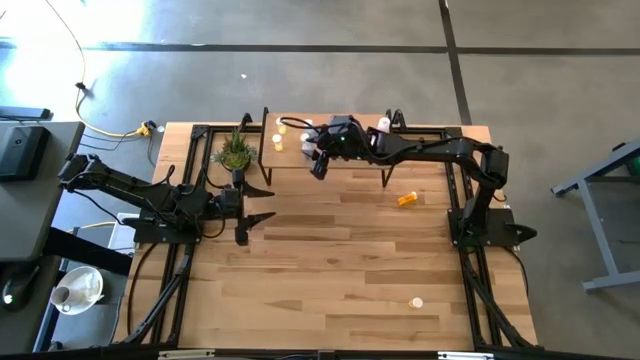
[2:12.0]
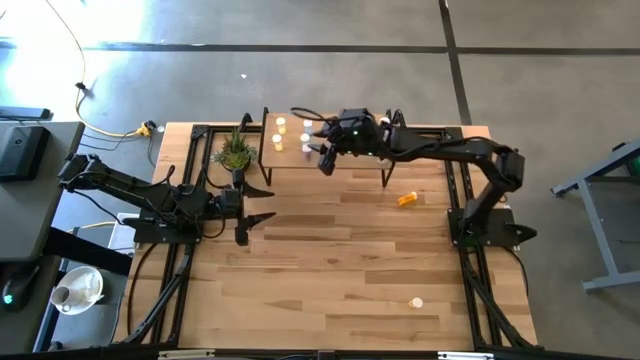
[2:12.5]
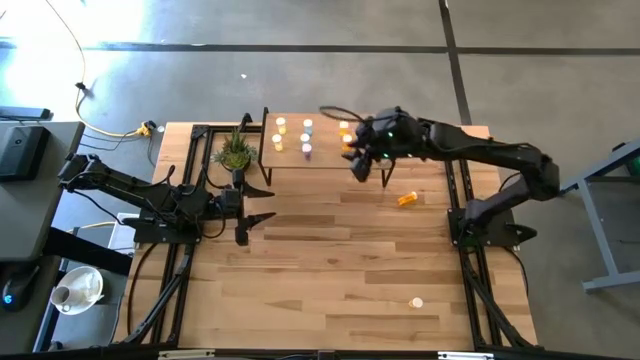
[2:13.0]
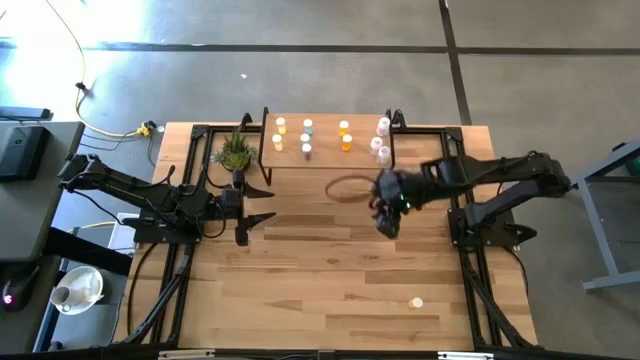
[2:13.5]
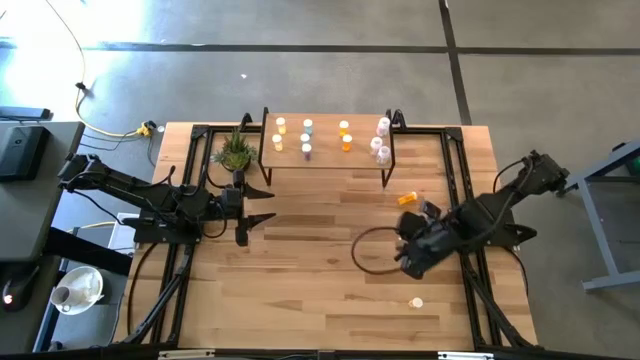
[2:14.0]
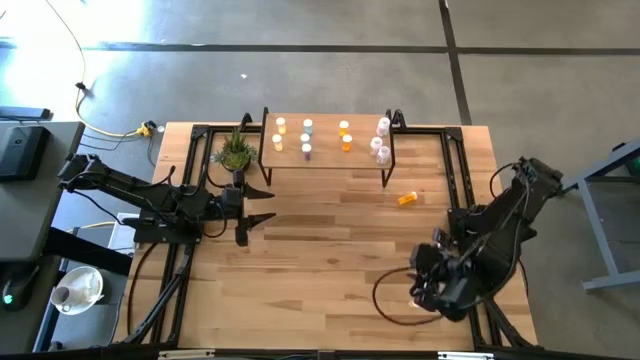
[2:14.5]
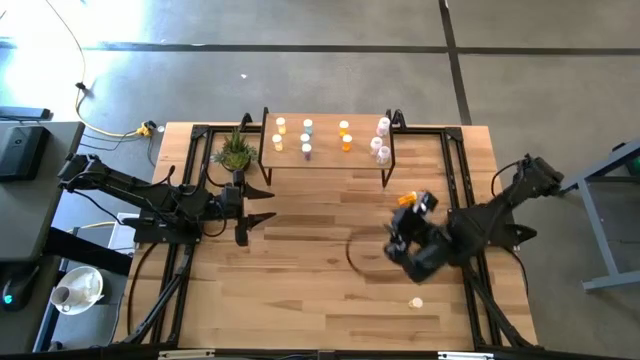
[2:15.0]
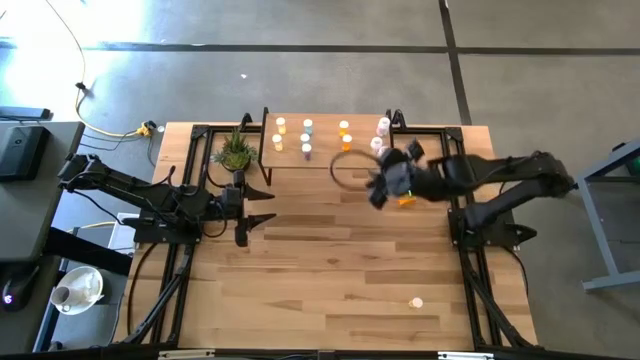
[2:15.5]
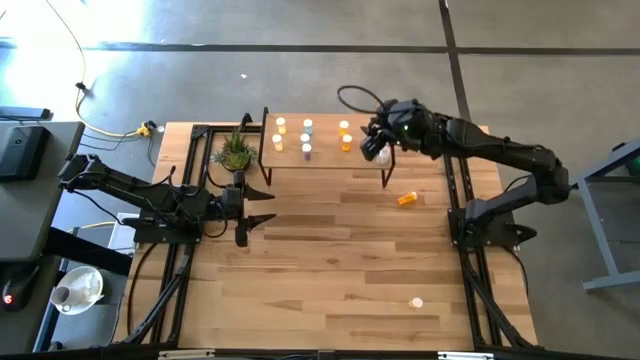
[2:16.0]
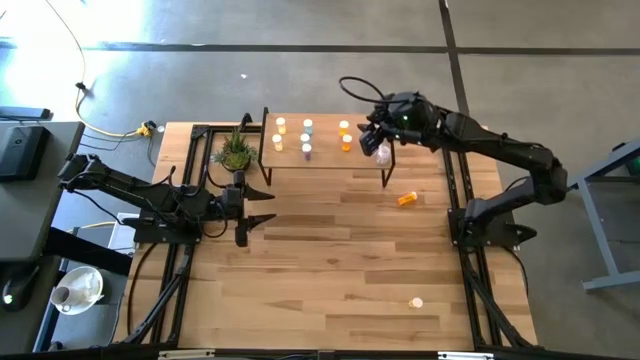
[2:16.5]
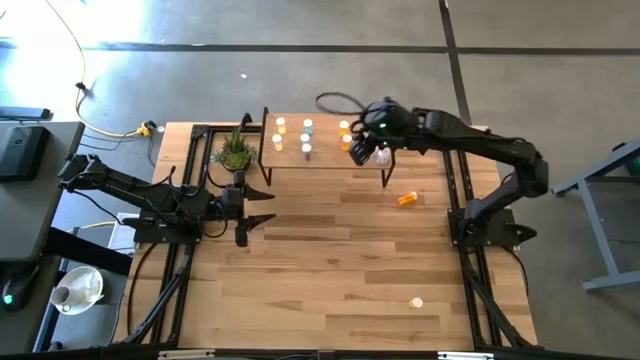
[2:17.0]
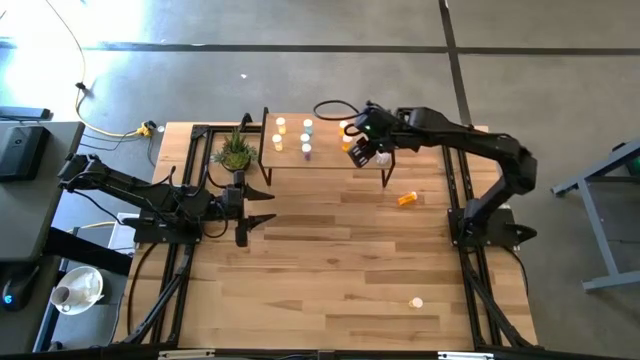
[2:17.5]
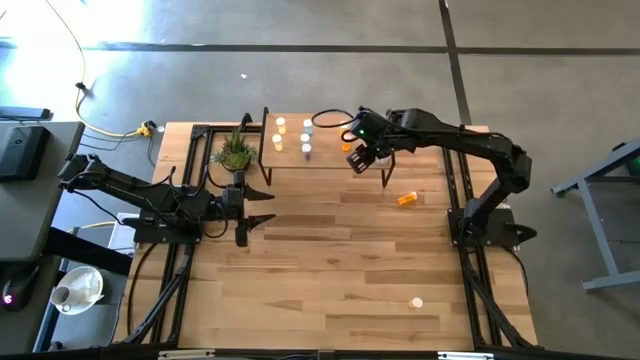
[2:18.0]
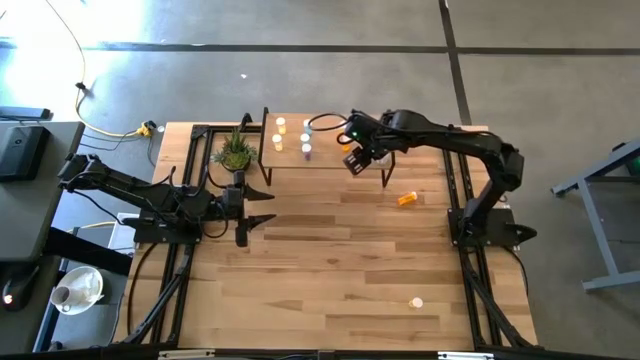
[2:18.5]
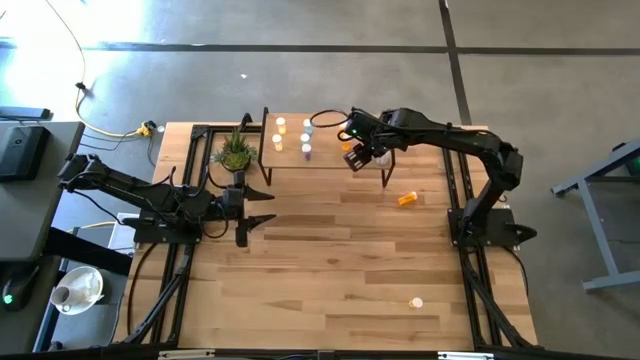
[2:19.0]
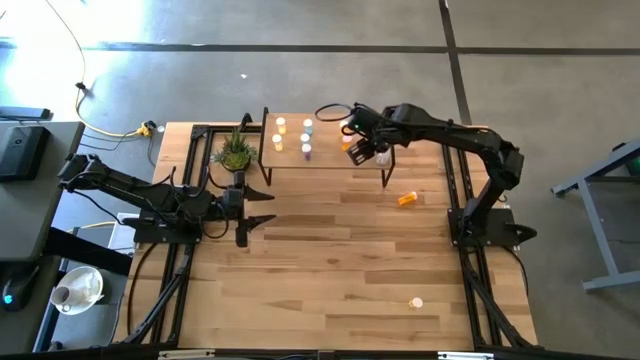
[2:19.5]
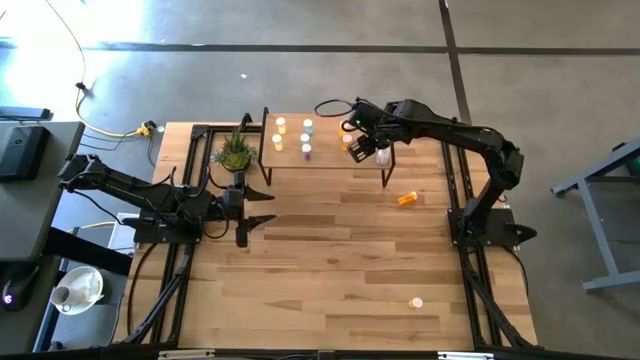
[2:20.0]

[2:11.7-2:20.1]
Task: Pick and place medicine bottles onto shelf by color
Adjust the white pill bottle on the shelf
